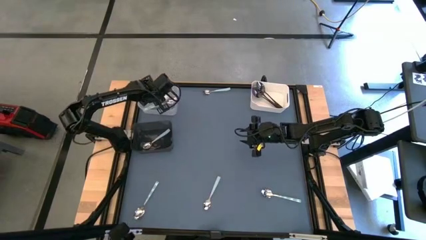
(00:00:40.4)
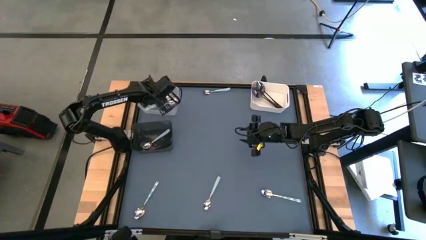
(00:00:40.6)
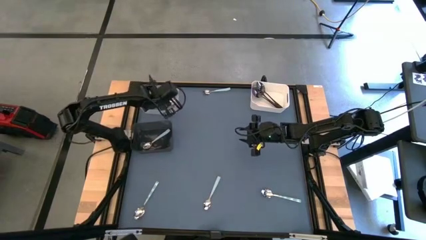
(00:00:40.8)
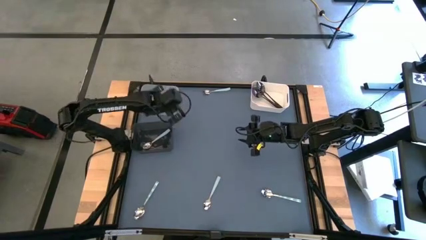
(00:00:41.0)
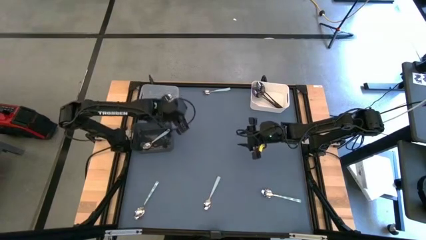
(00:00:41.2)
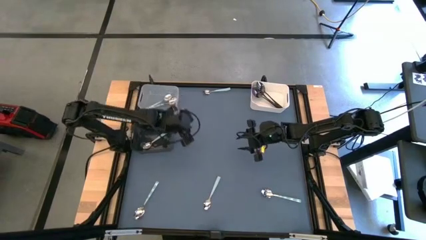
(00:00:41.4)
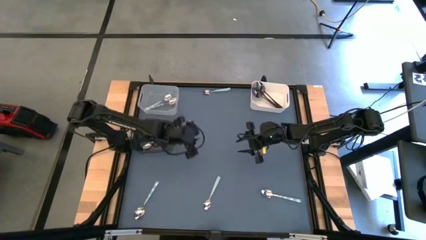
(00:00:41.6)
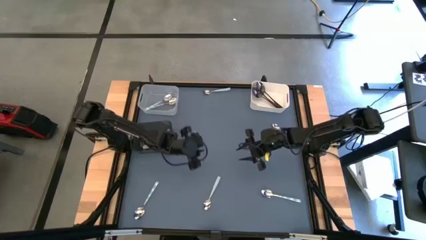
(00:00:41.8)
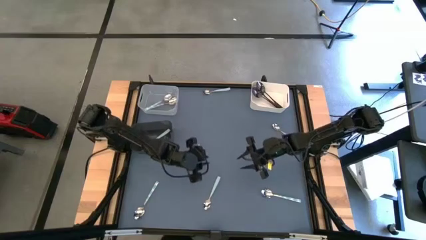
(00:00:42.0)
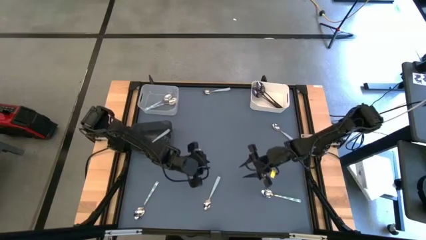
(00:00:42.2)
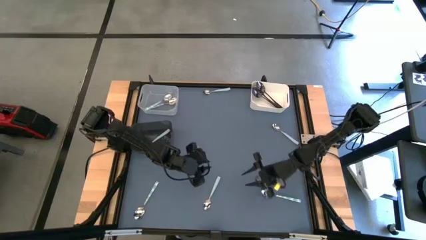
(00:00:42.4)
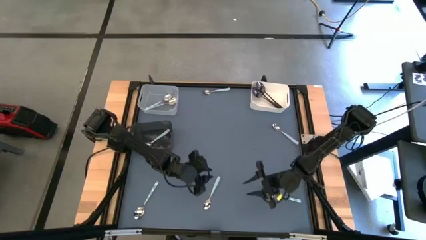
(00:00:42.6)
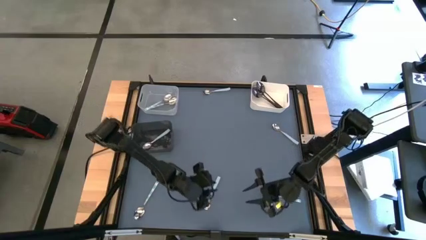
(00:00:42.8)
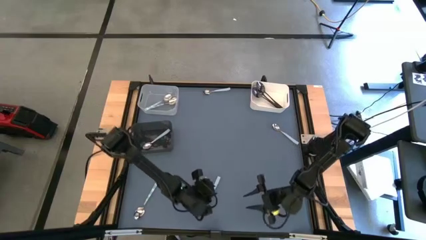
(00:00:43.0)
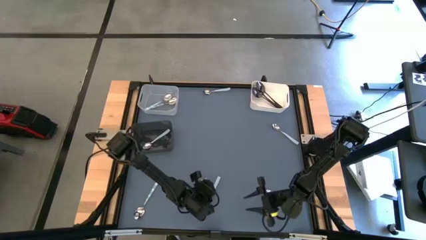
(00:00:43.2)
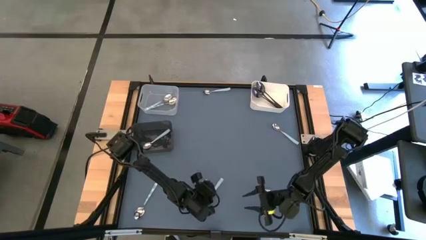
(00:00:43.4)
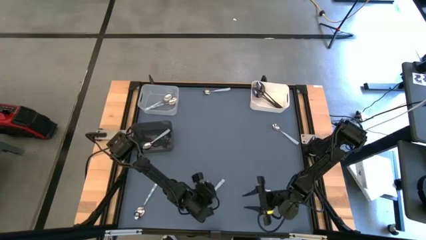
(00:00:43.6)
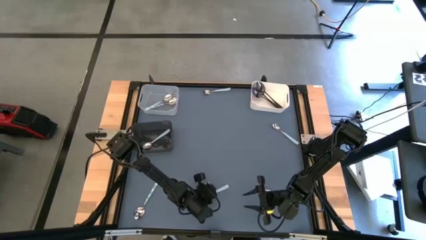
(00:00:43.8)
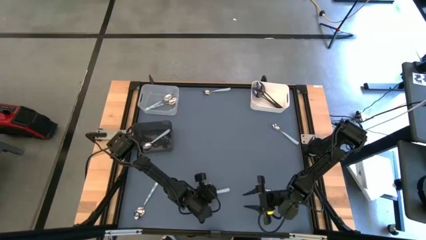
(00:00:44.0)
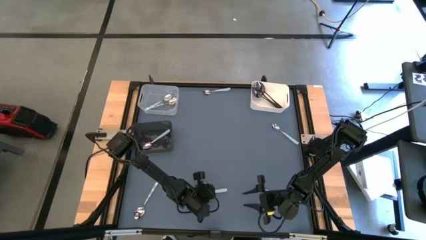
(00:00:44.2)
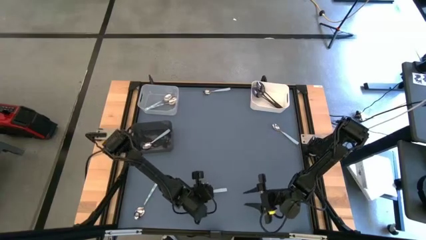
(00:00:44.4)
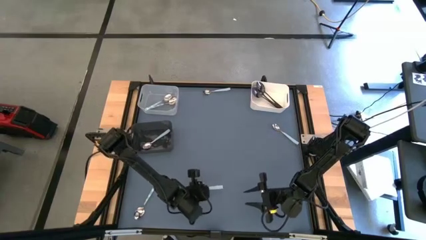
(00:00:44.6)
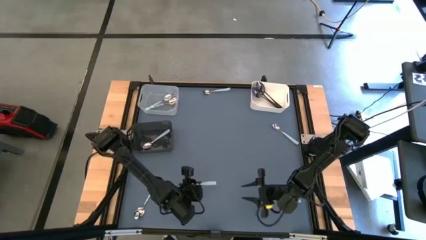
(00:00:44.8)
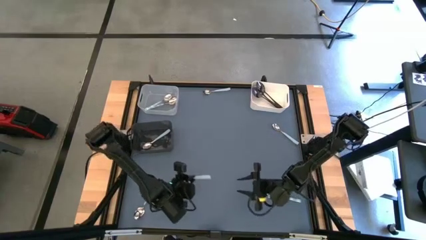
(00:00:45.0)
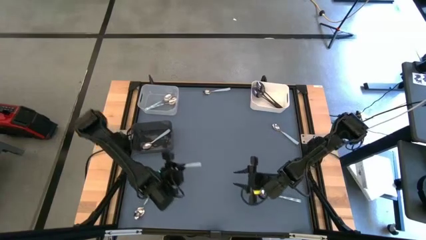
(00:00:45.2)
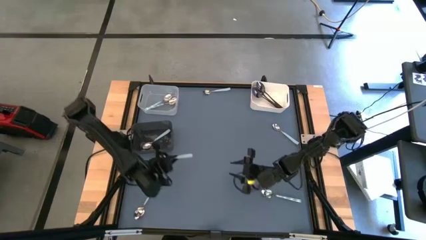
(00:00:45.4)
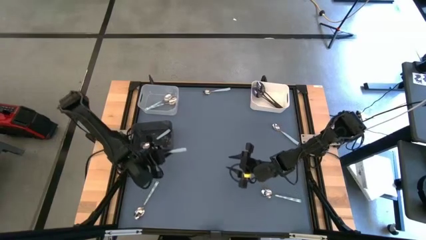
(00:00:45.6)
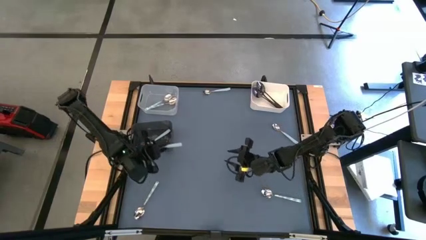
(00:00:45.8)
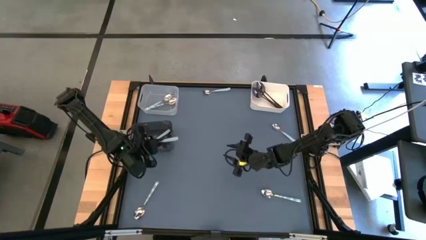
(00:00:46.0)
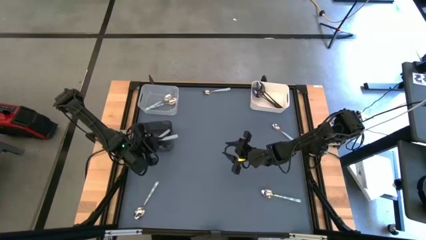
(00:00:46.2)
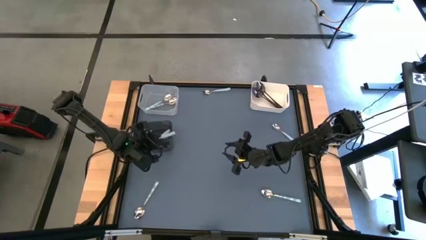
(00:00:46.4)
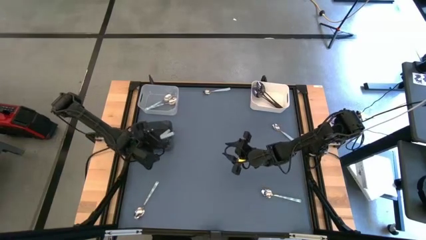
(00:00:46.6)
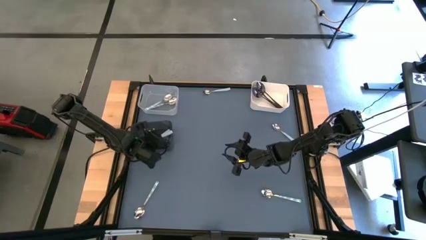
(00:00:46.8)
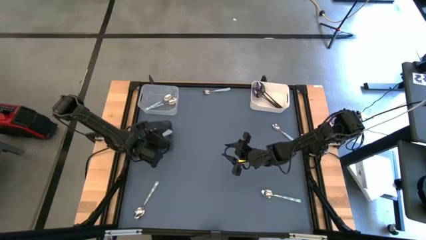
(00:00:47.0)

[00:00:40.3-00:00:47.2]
Task: Sort silverware by color (type)
Put the blue spoon into the black bin

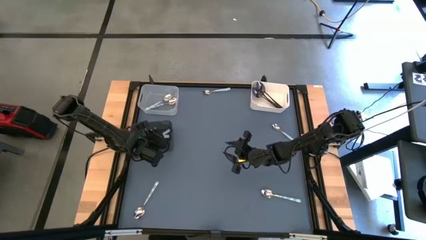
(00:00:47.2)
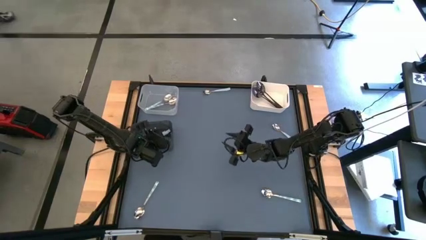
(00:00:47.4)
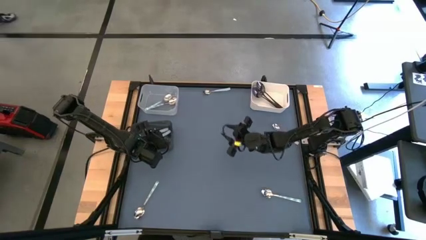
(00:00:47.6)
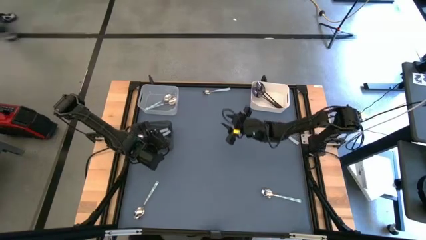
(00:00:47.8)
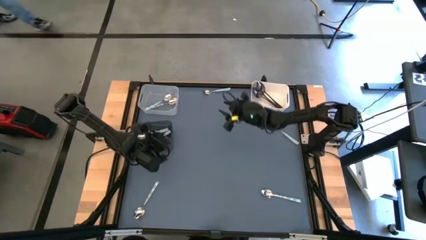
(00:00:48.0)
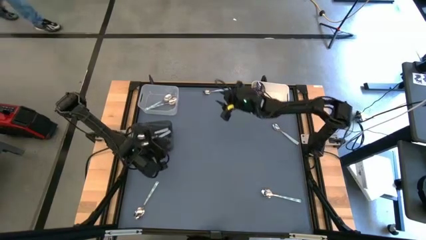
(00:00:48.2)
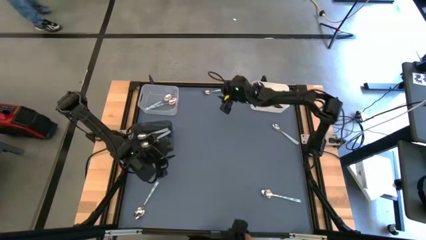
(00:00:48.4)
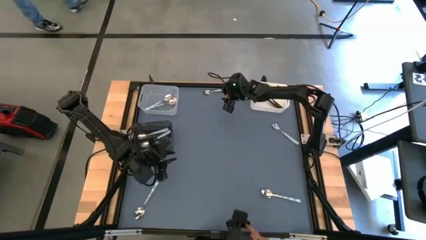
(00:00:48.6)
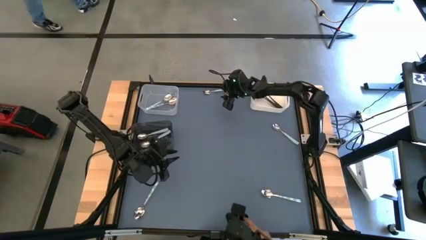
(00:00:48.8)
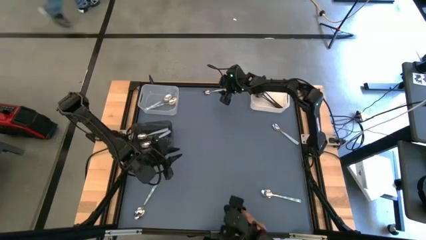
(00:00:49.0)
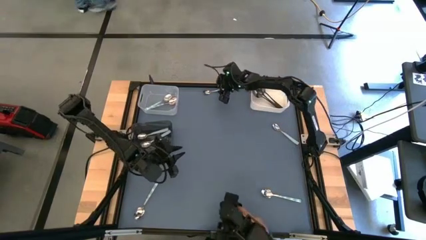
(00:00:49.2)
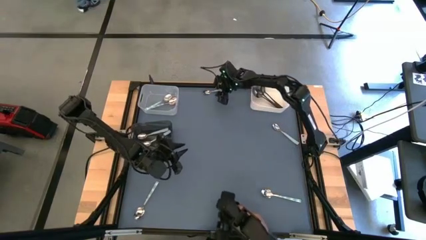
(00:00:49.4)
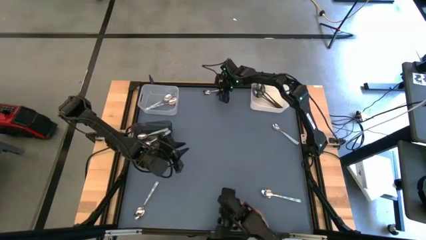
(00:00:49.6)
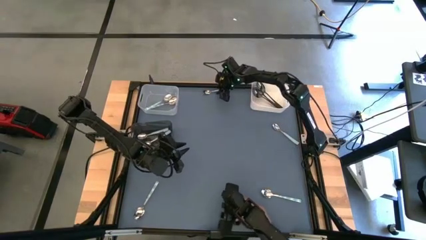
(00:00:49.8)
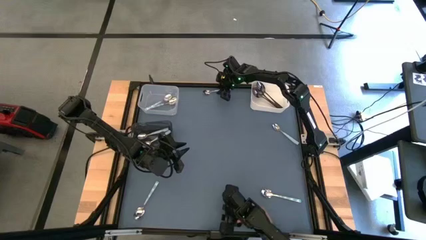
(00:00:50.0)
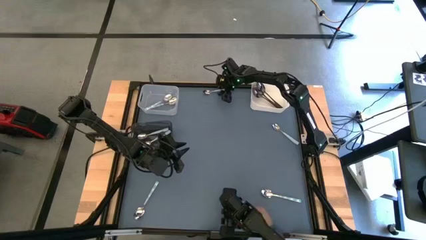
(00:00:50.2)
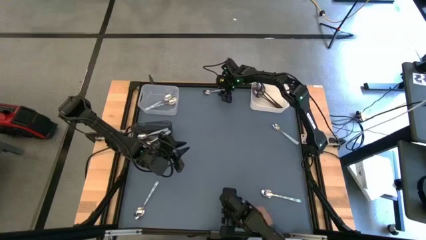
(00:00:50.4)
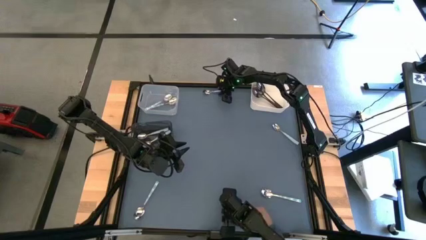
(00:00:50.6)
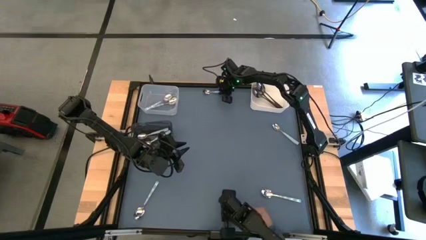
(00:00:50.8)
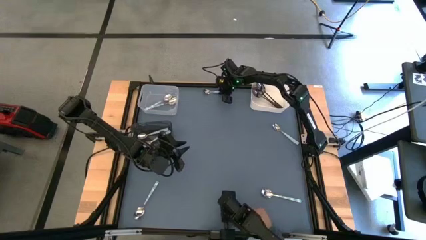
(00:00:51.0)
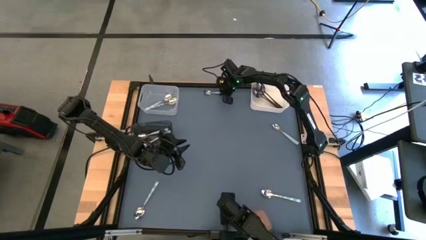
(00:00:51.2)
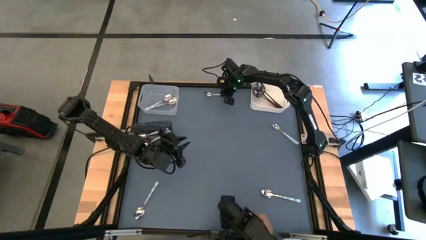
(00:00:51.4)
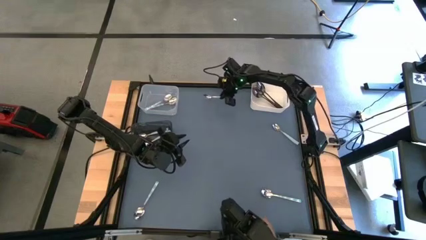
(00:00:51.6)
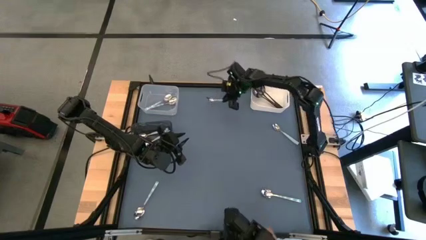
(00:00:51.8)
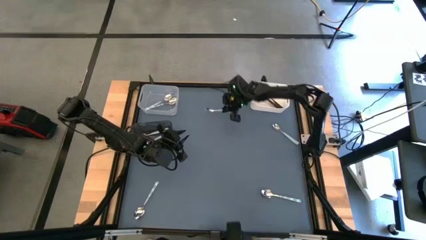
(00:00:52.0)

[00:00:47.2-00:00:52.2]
Put the blue spoon into the black bin

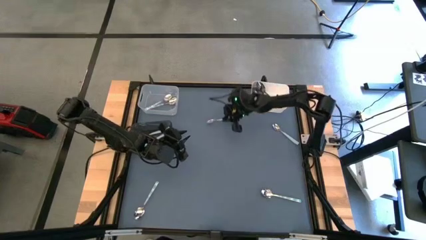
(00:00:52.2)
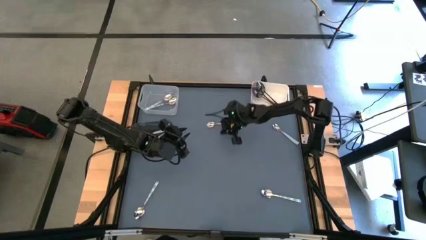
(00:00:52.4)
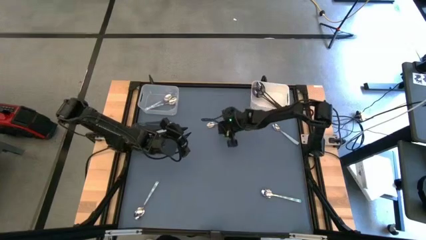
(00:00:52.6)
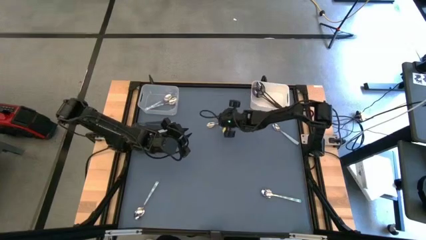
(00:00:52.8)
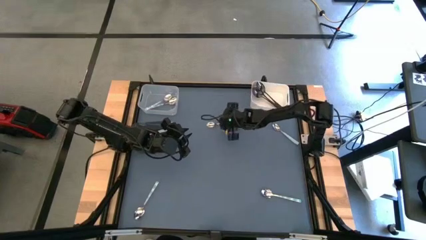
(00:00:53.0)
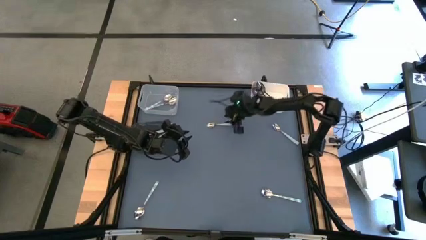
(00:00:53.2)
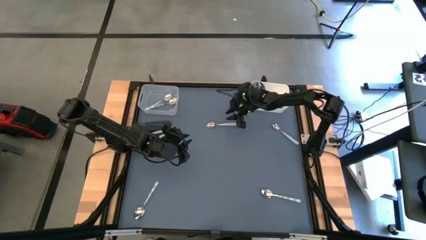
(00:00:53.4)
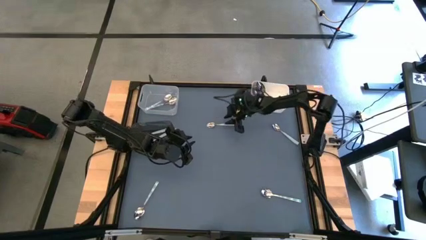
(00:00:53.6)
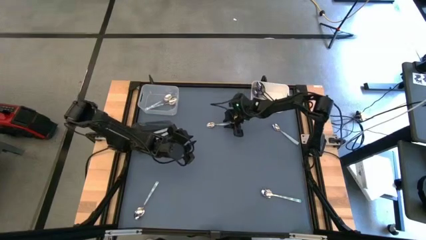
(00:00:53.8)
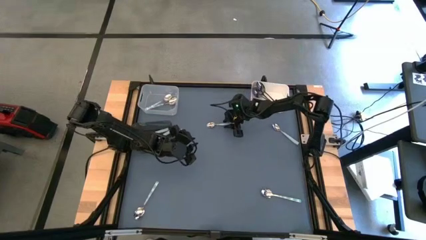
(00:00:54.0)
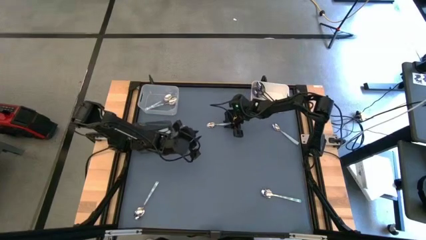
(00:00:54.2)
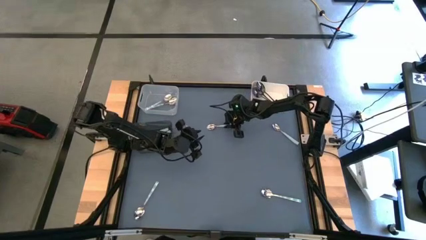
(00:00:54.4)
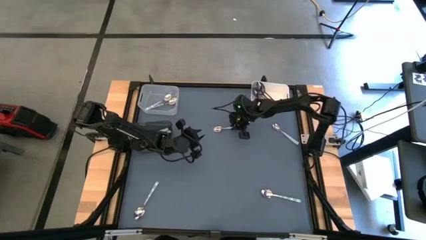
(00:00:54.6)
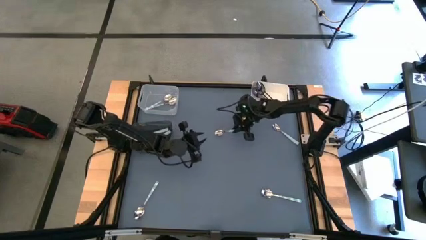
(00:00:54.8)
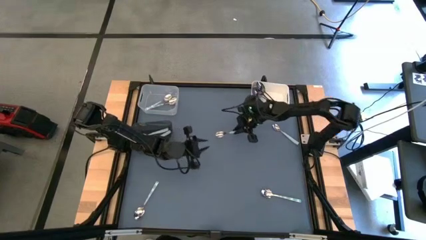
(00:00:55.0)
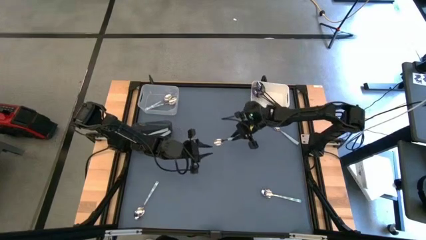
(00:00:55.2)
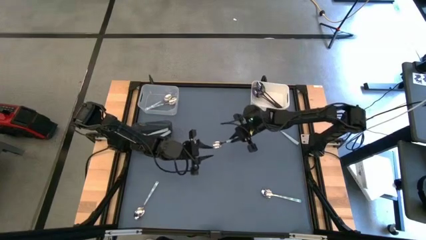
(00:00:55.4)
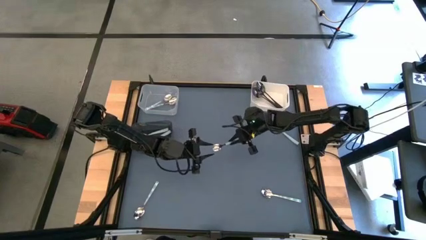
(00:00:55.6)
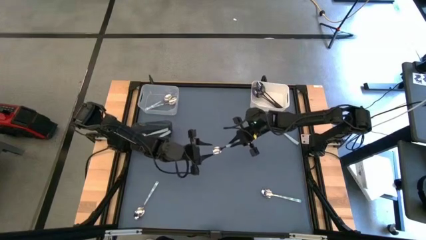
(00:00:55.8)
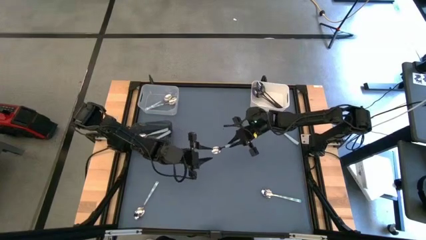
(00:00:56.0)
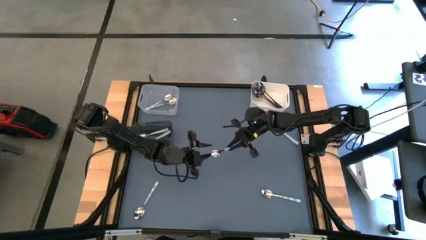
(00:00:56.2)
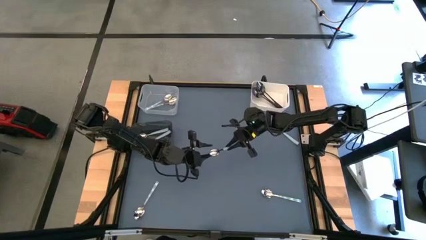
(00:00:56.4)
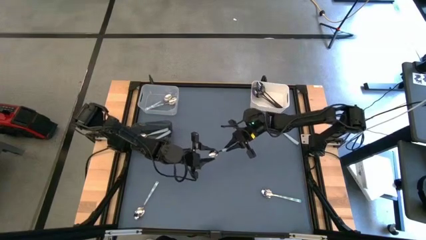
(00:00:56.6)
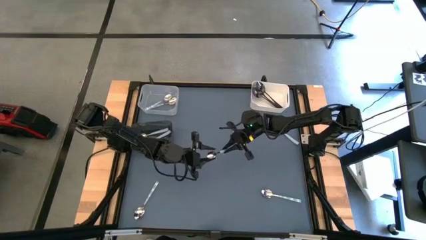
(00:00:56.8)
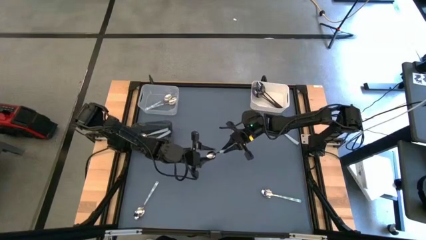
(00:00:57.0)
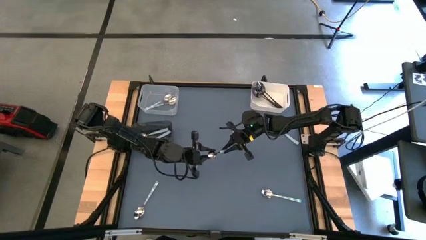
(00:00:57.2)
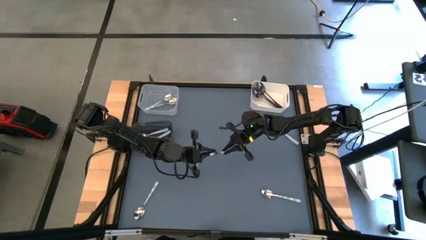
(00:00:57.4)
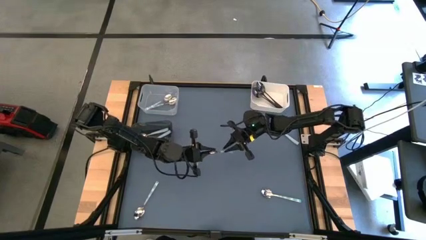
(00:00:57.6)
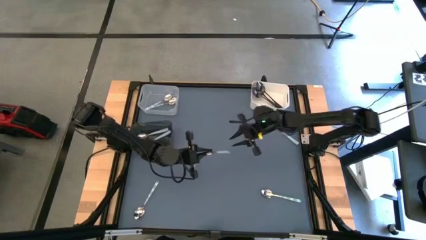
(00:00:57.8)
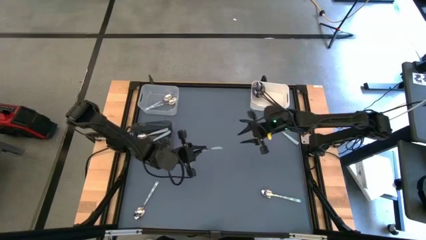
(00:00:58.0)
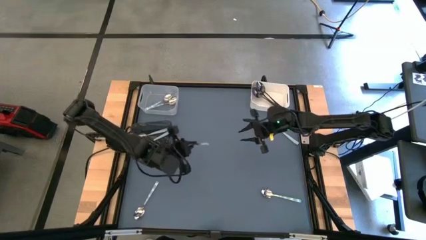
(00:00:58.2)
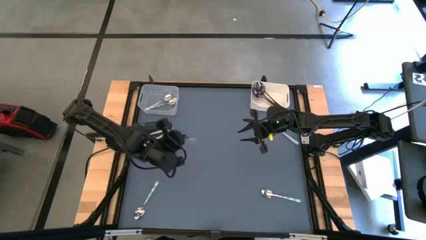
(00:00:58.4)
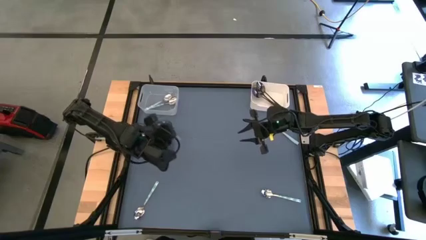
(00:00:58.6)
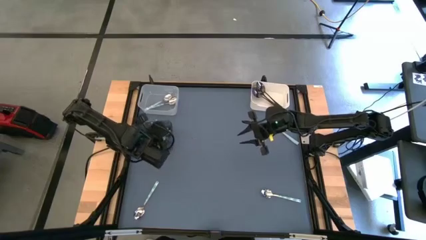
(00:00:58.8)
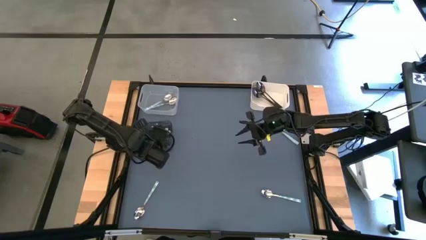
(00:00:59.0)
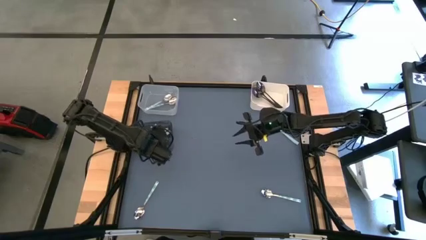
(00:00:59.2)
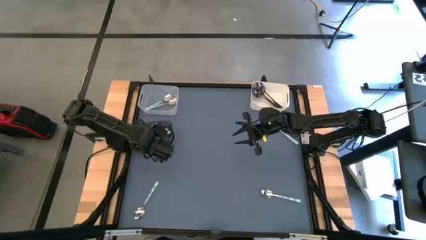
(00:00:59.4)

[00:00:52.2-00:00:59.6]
Put the blue spoon into the black bin
